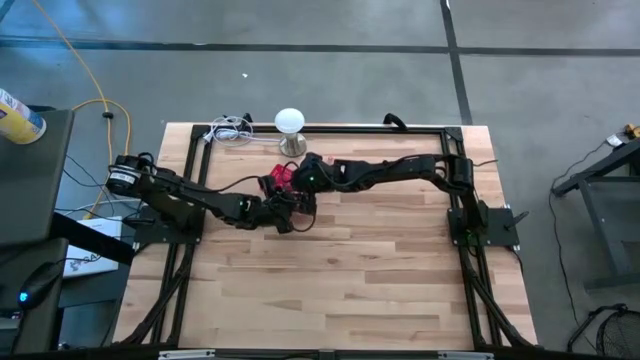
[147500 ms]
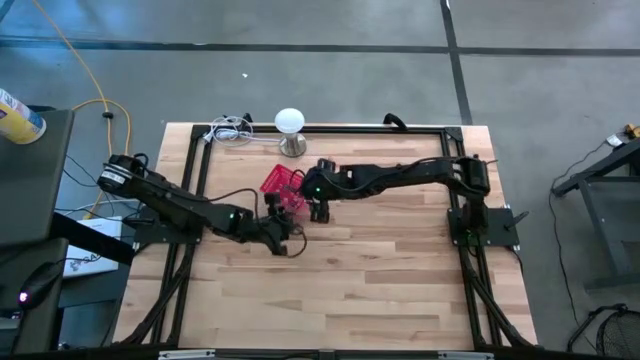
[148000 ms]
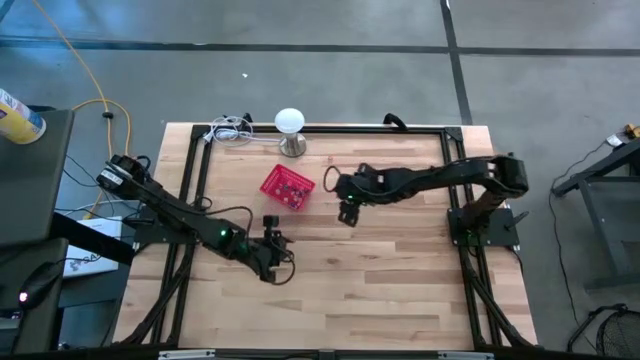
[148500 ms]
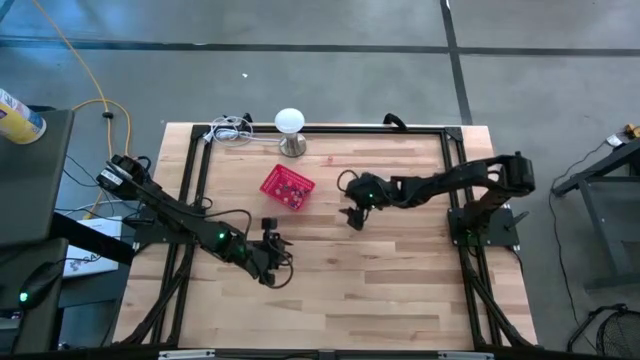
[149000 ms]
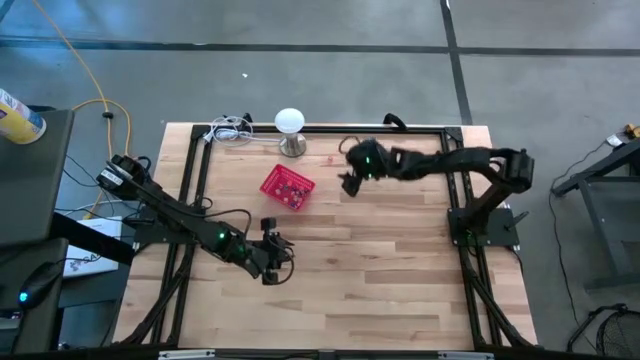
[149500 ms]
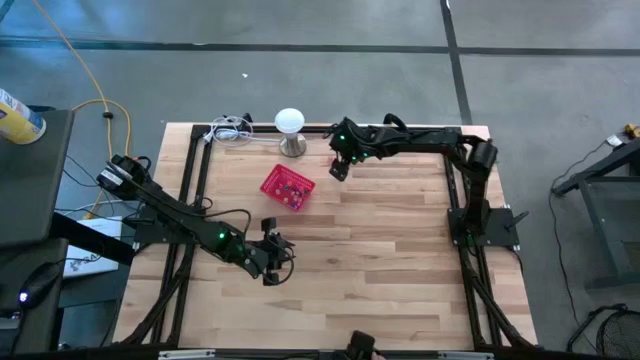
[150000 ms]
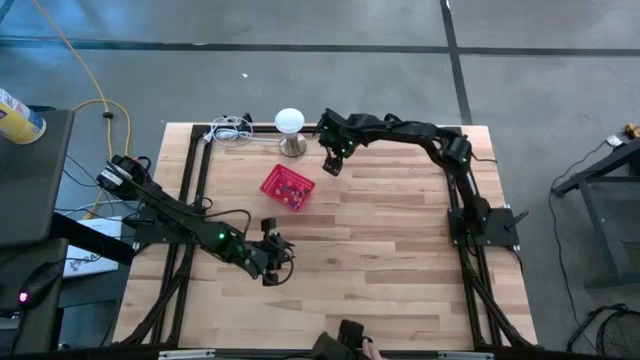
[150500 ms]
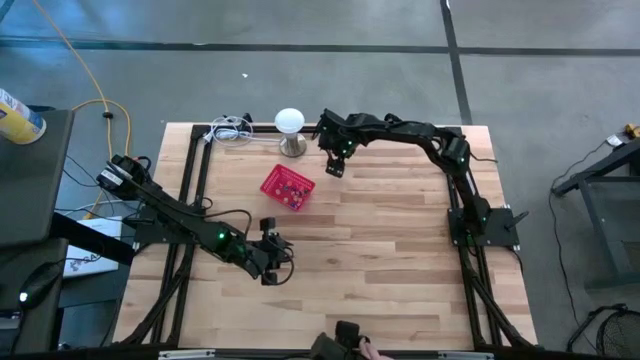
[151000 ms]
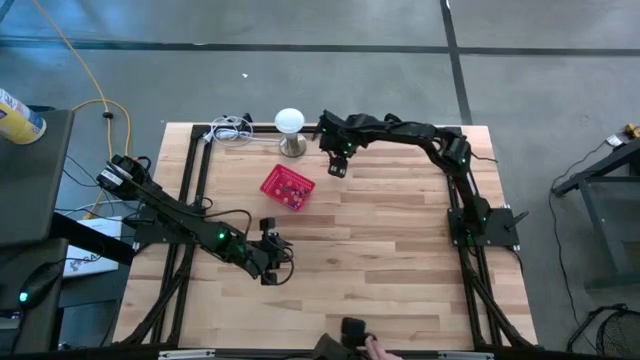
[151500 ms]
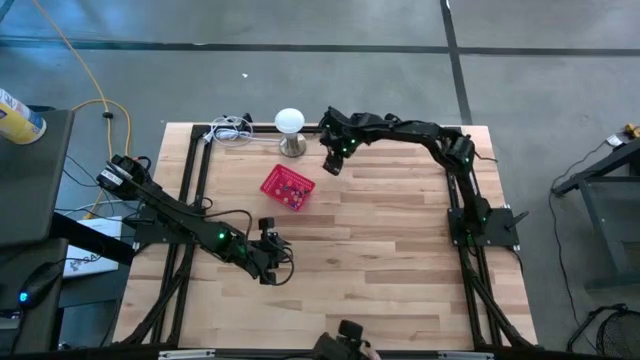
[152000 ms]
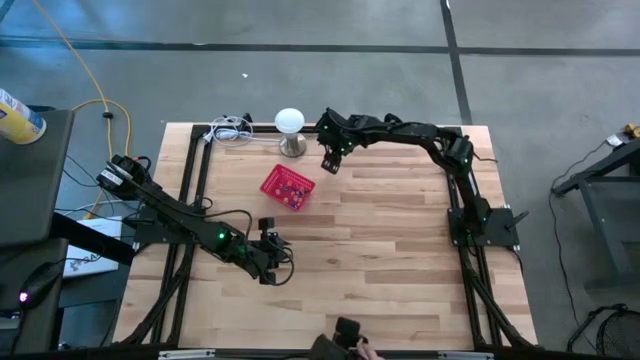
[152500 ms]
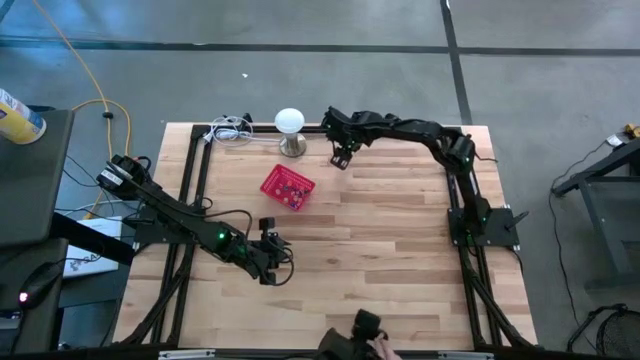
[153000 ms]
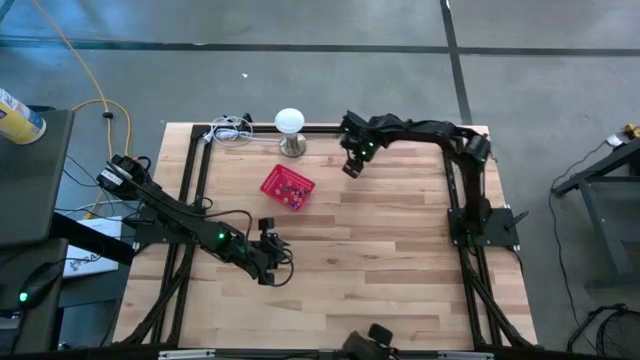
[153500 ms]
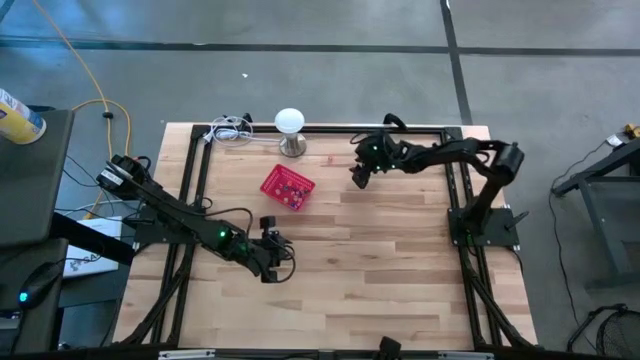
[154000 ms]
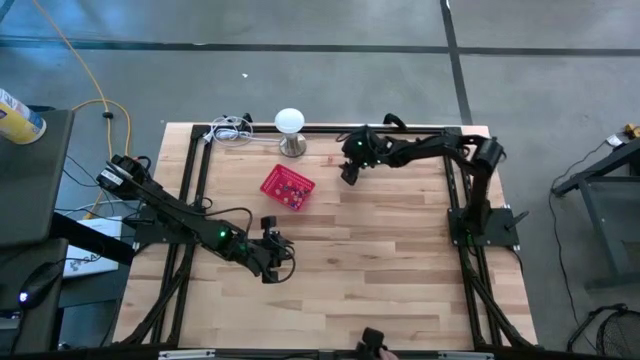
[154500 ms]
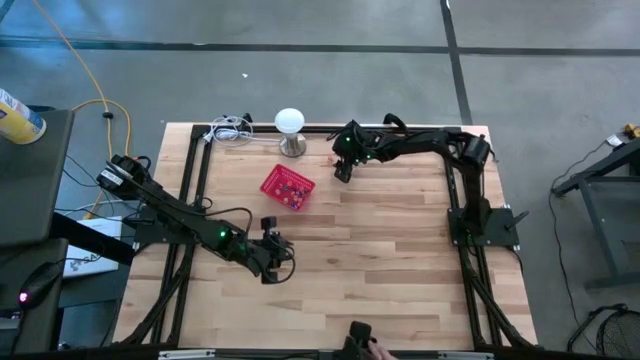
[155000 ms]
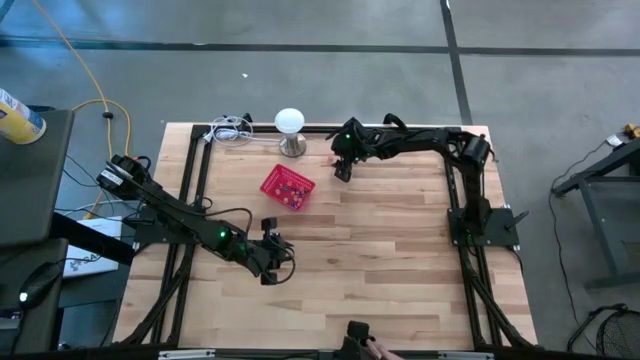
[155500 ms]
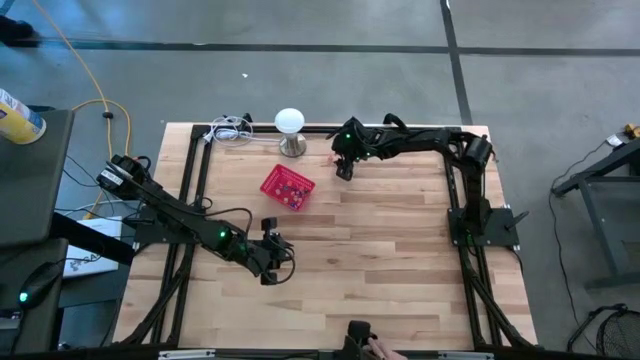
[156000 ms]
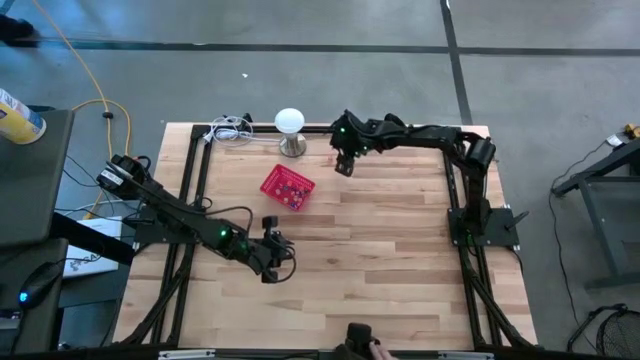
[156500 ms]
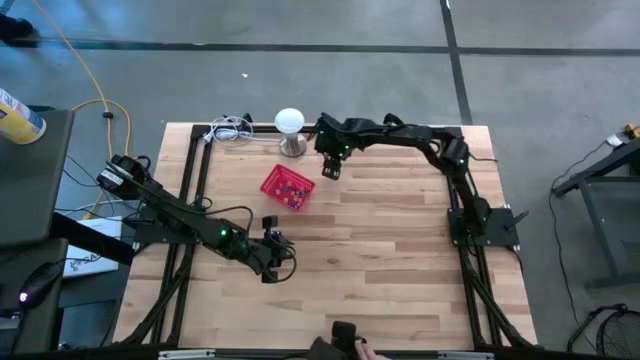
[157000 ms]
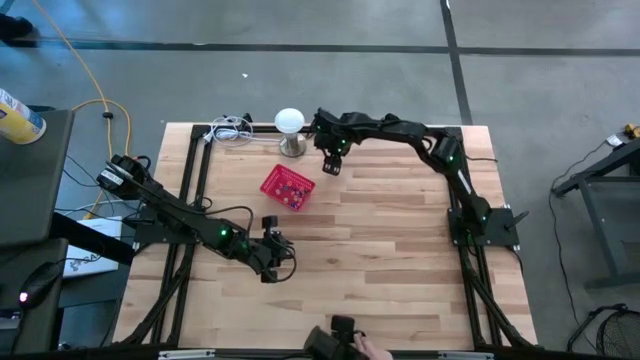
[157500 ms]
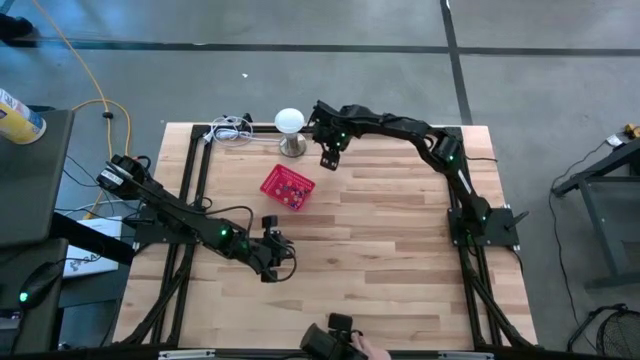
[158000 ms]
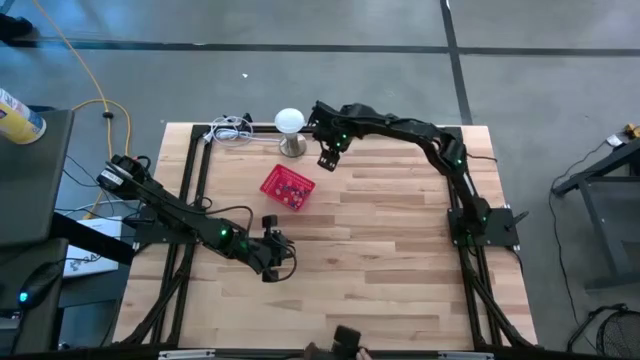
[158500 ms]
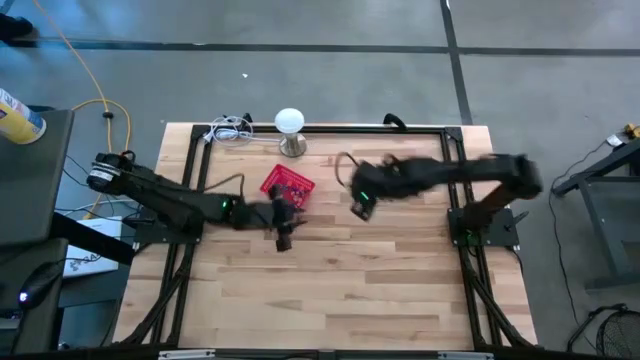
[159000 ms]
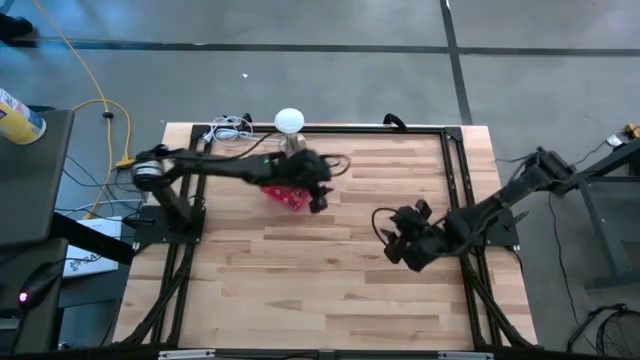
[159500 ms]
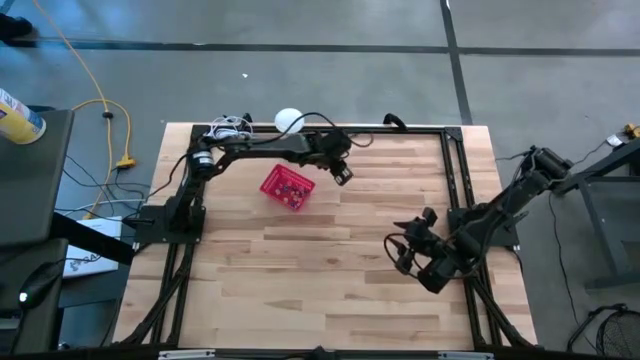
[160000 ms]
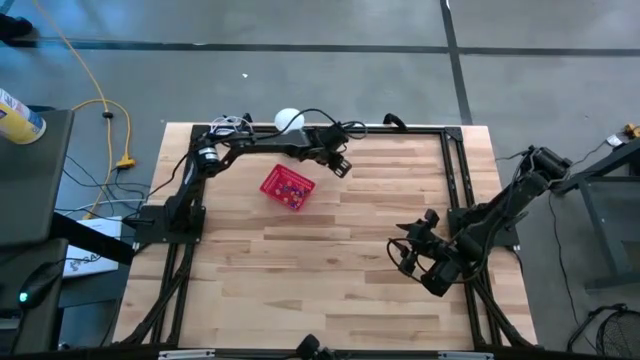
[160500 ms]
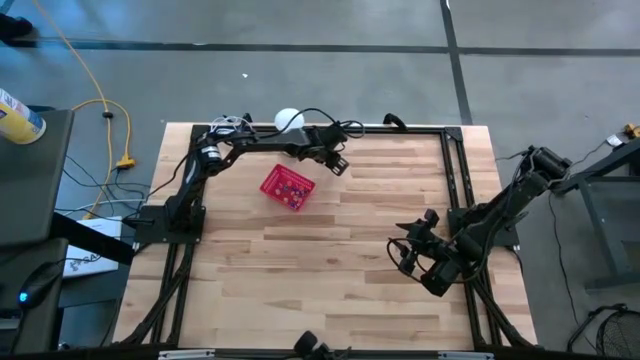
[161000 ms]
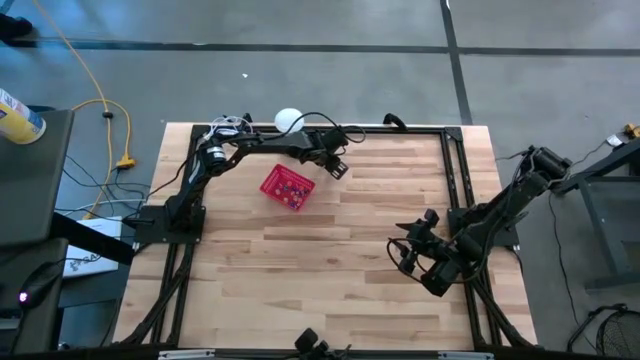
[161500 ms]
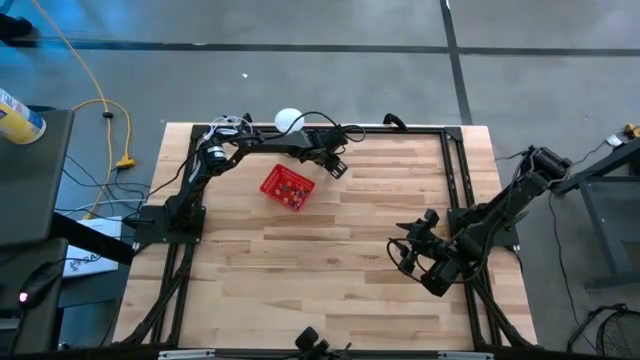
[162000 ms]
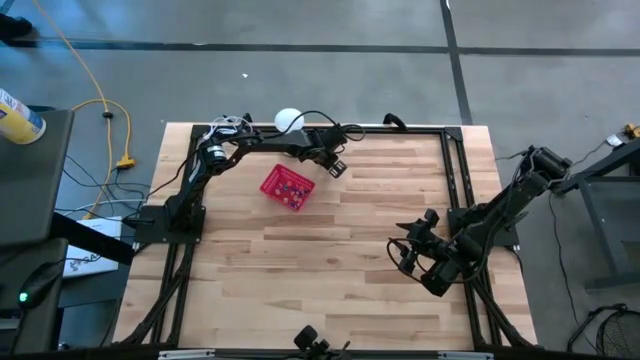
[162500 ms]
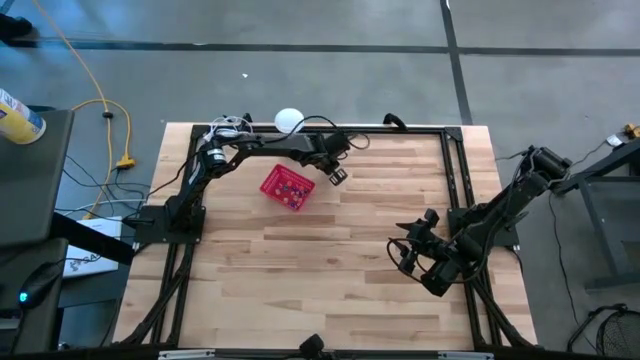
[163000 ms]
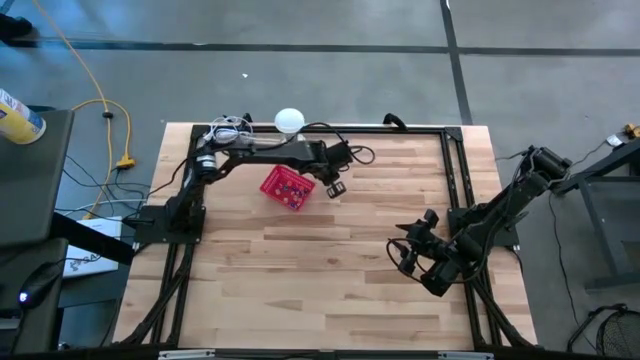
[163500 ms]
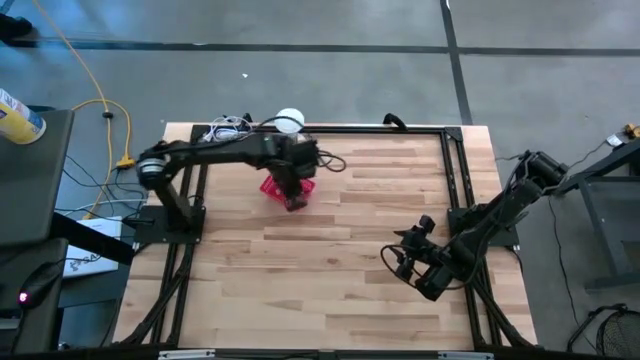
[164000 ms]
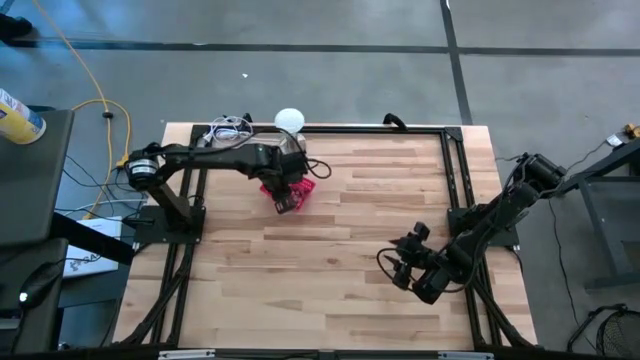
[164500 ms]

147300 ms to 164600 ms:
Task: Pick & Place Dice
Put the pink die into the red basket

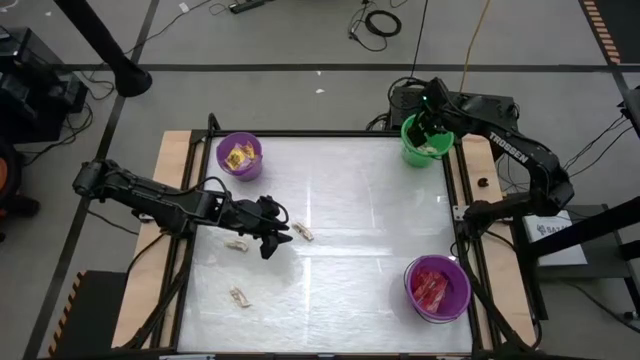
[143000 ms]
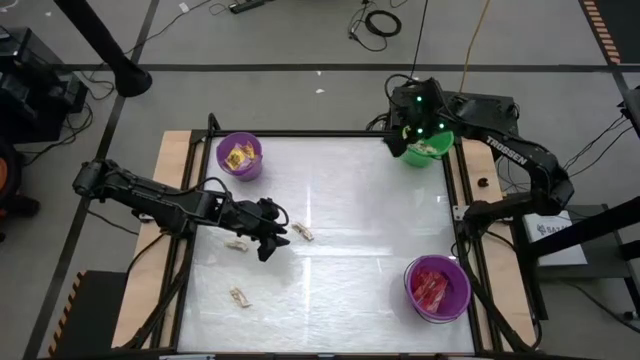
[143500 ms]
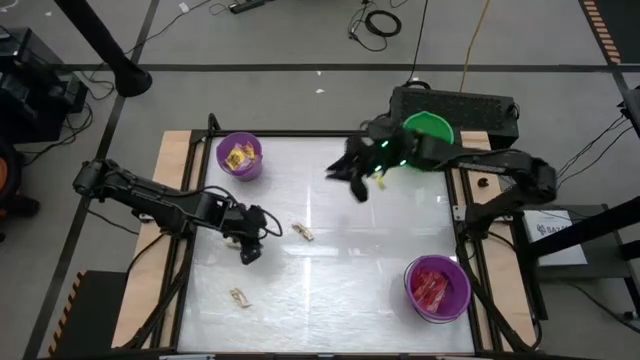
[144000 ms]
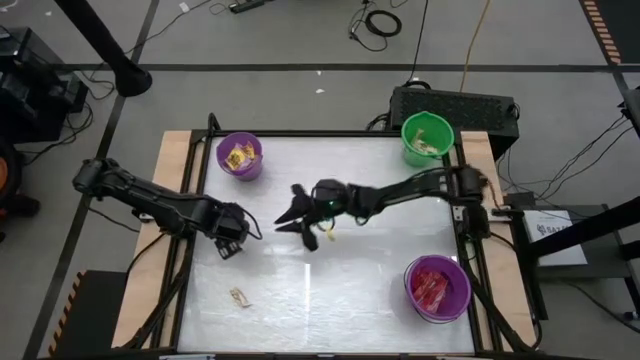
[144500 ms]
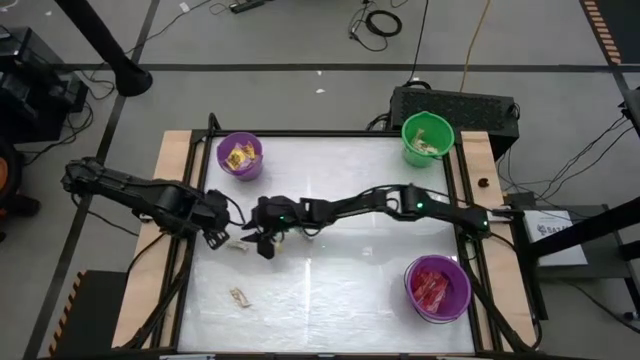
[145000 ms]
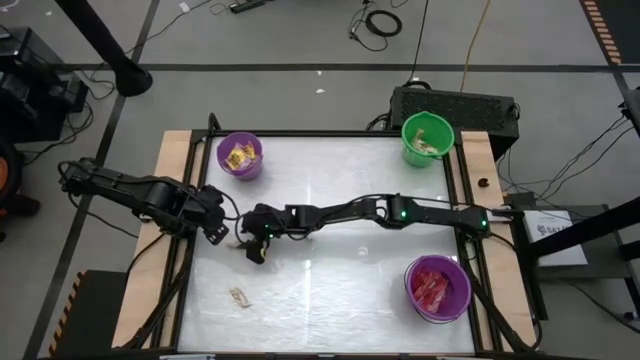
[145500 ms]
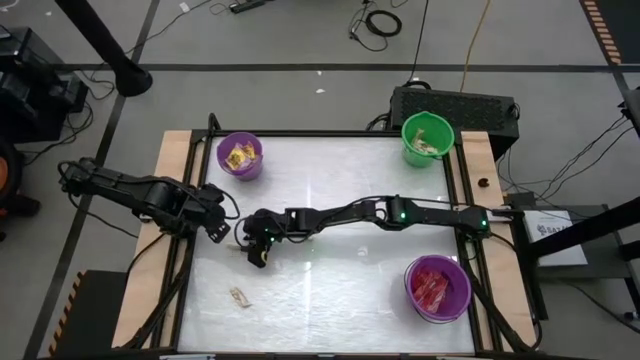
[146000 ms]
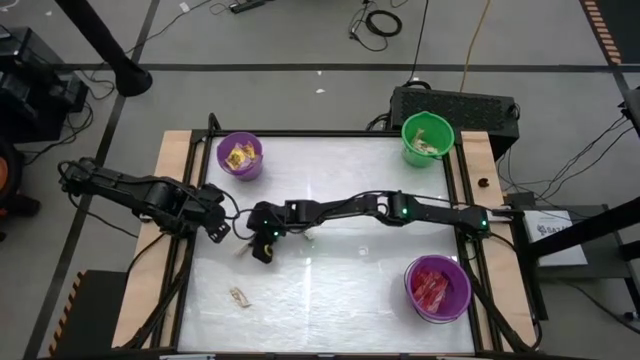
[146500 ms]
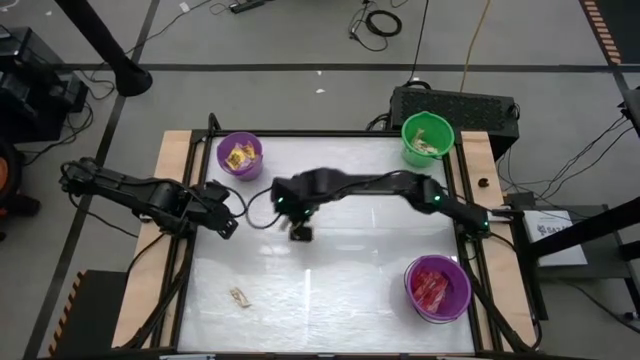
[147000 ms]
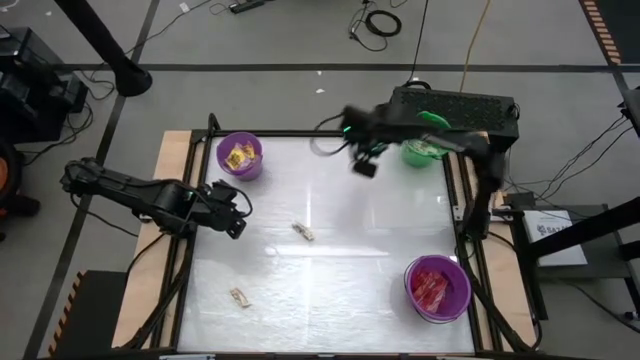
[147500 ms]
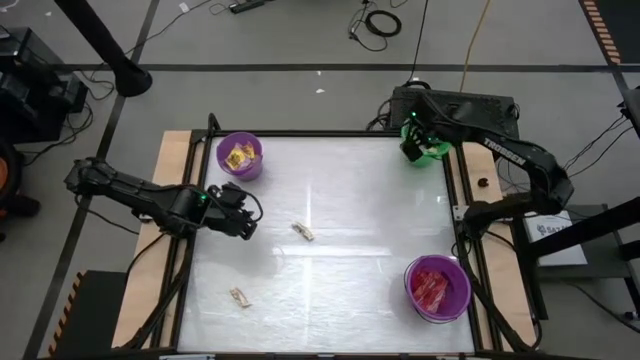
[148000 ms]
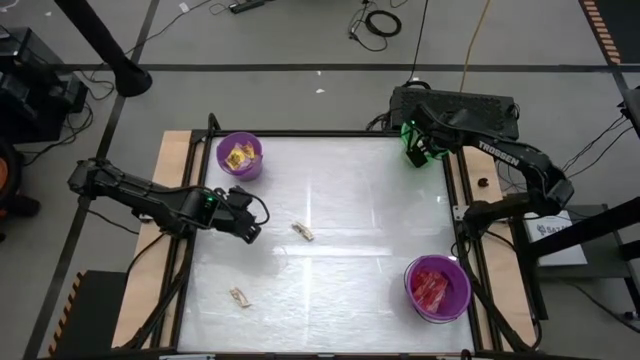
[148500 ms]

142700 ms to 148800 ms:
Task: Sort candy by brand, put in halloween buckets
Put the white candy into the green bucket
